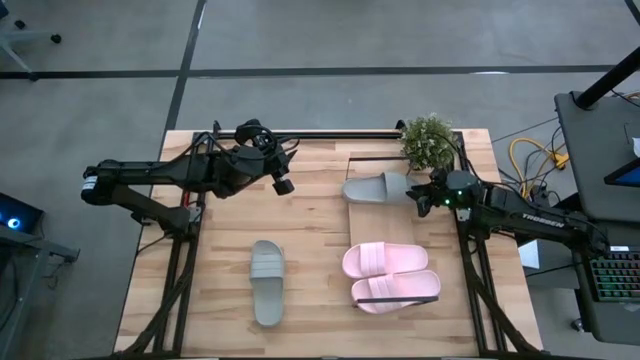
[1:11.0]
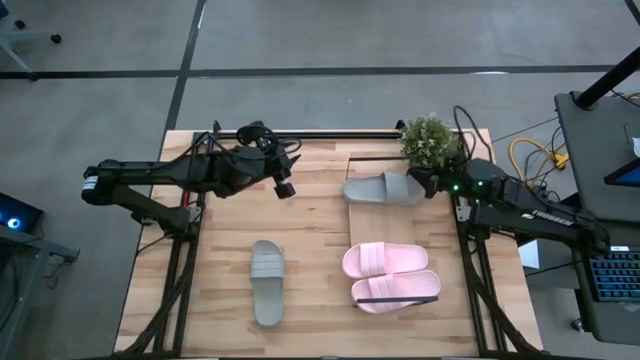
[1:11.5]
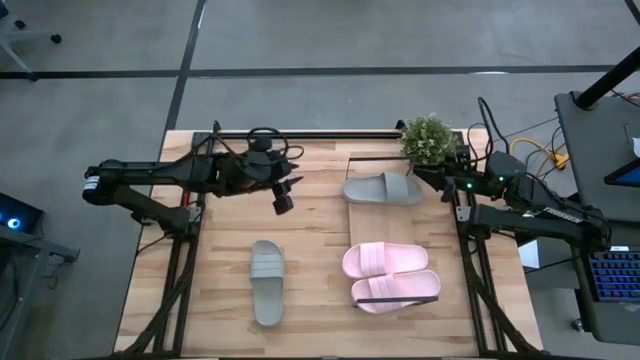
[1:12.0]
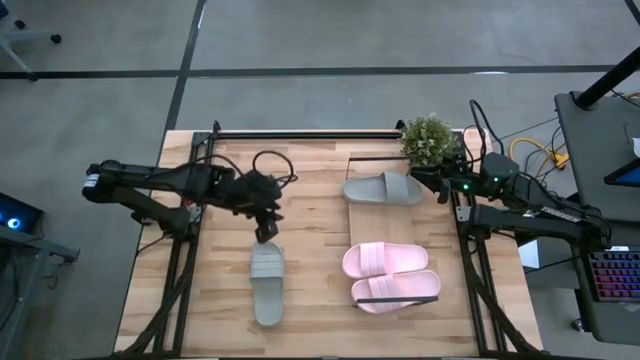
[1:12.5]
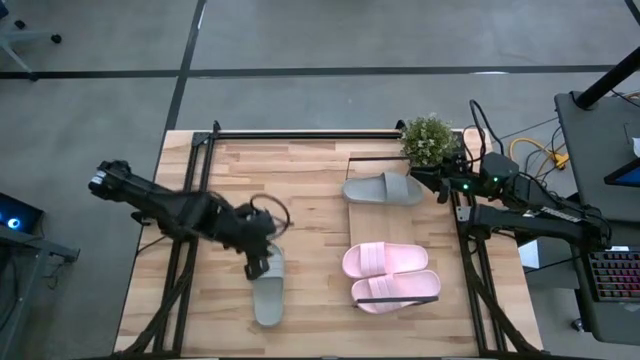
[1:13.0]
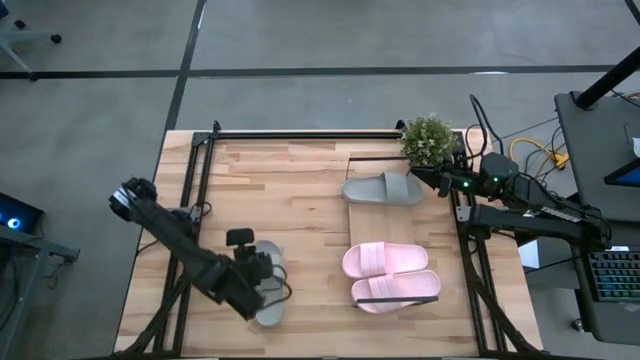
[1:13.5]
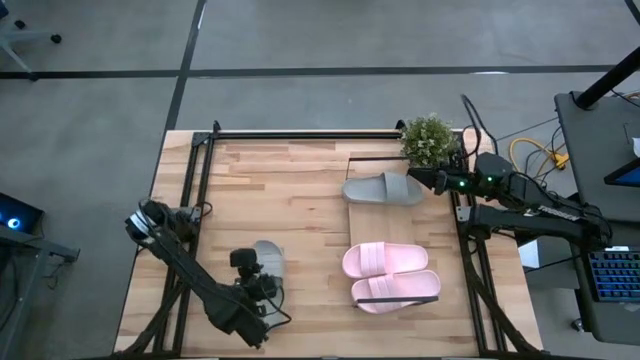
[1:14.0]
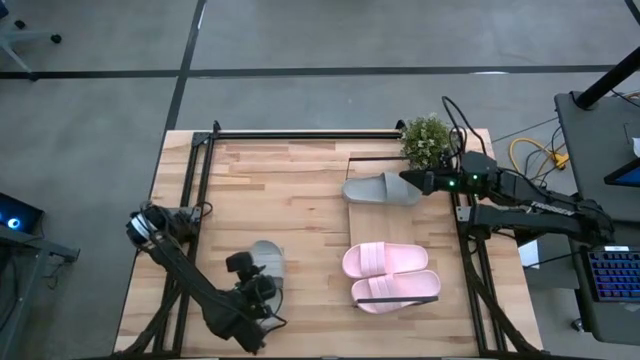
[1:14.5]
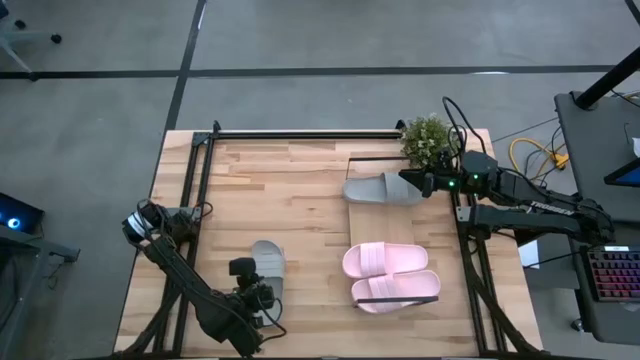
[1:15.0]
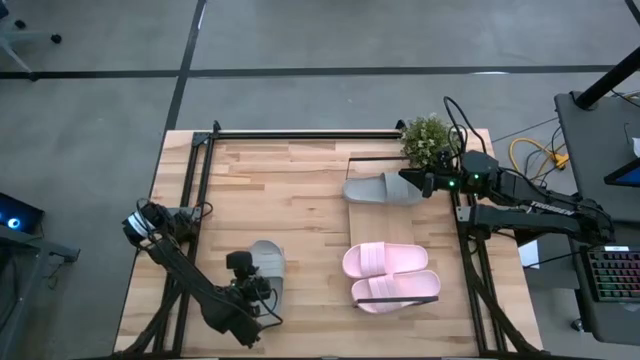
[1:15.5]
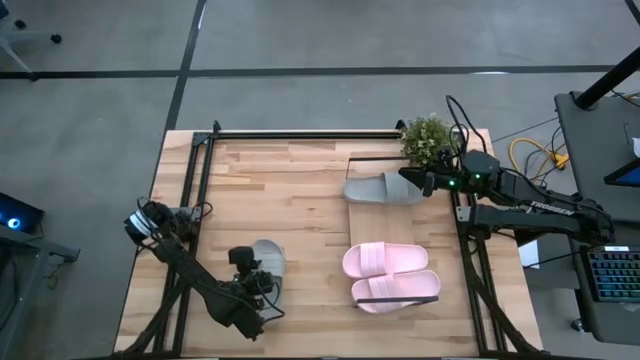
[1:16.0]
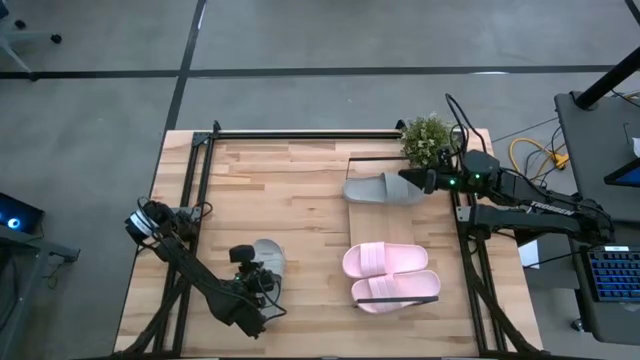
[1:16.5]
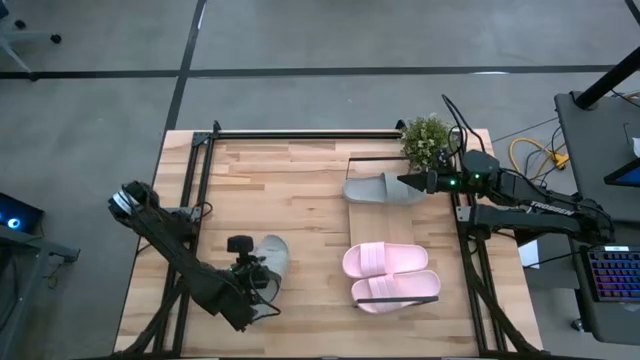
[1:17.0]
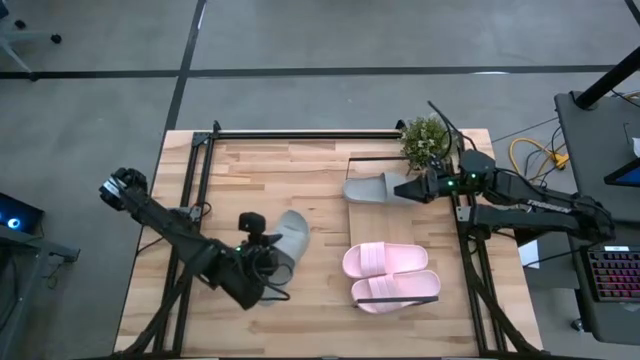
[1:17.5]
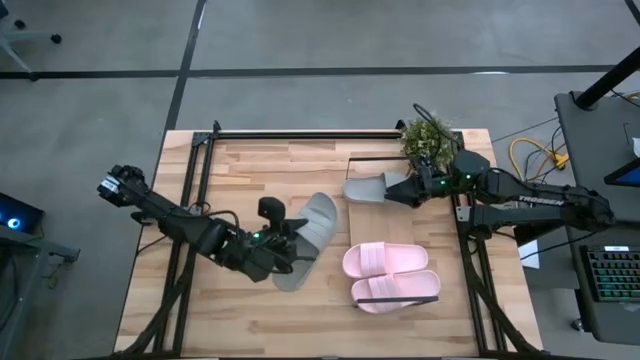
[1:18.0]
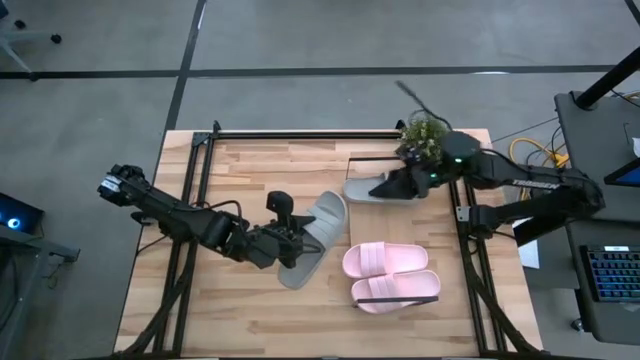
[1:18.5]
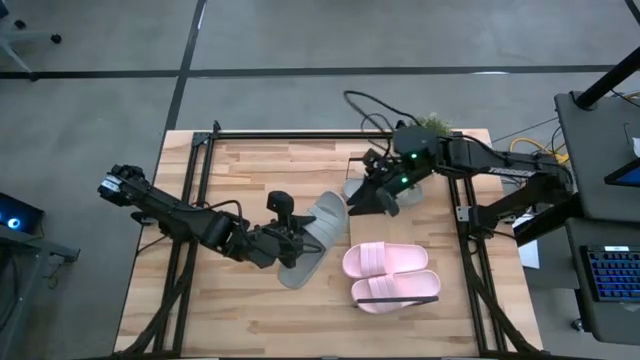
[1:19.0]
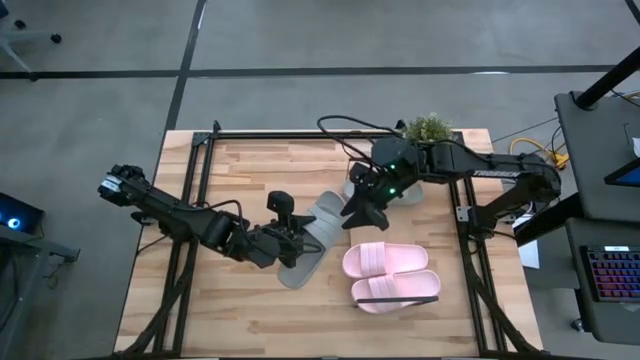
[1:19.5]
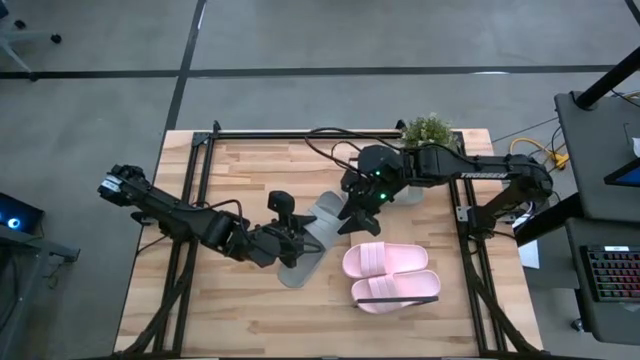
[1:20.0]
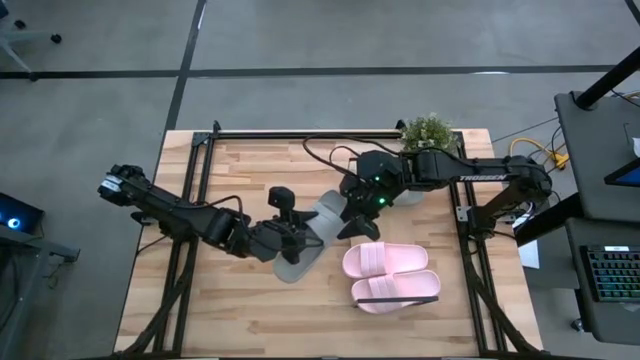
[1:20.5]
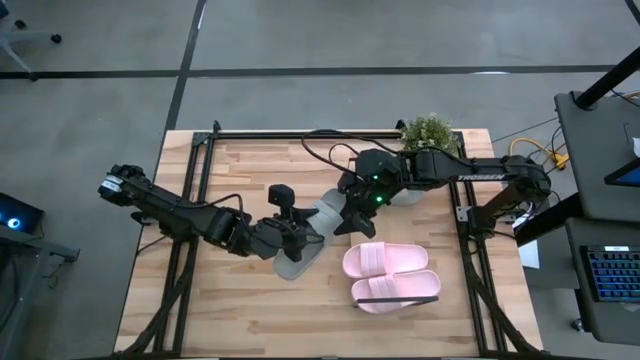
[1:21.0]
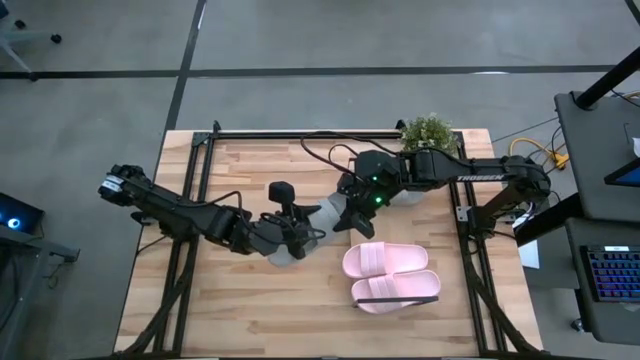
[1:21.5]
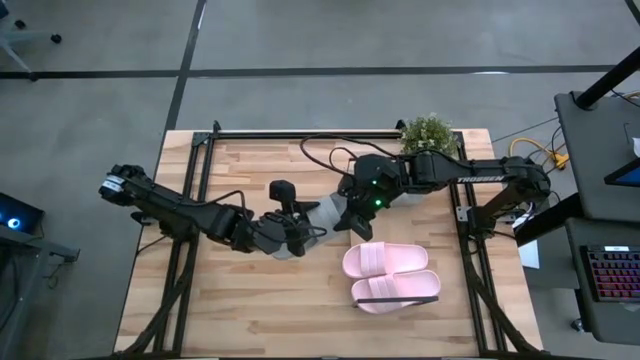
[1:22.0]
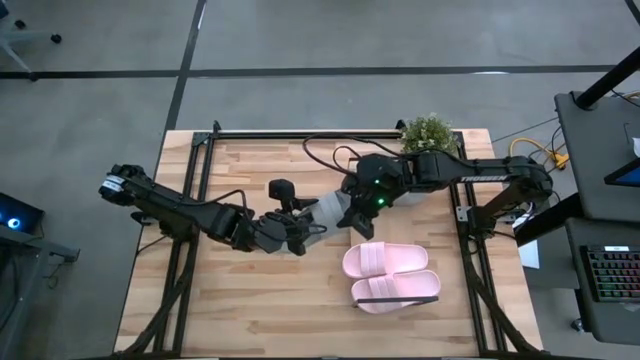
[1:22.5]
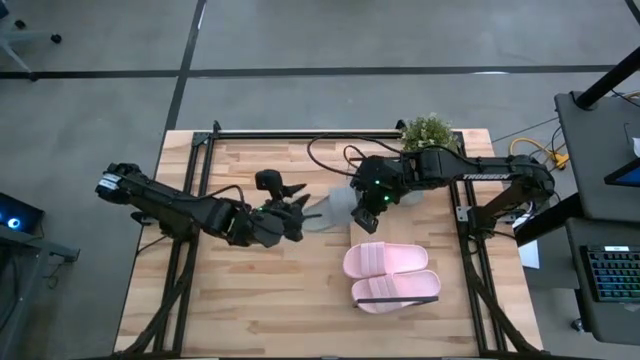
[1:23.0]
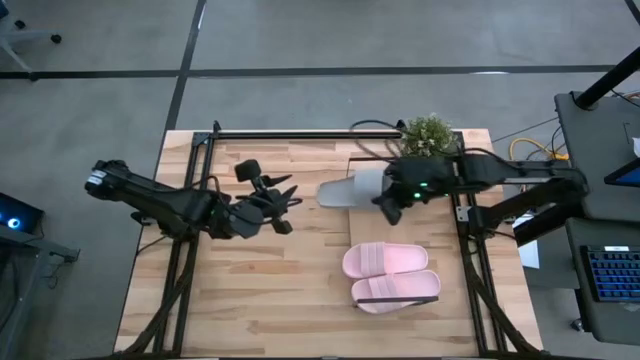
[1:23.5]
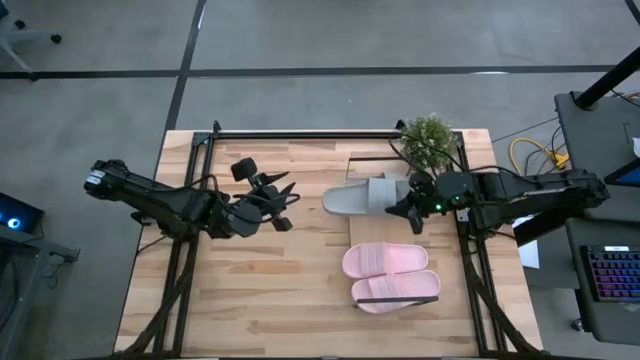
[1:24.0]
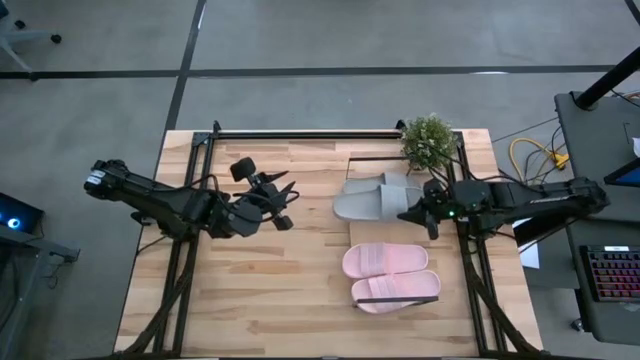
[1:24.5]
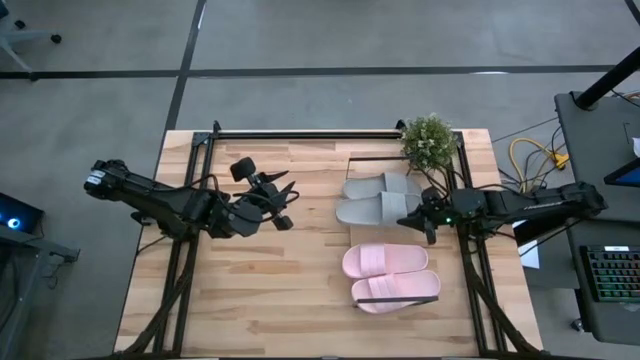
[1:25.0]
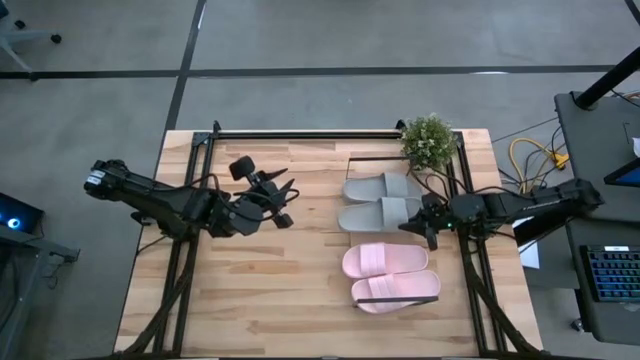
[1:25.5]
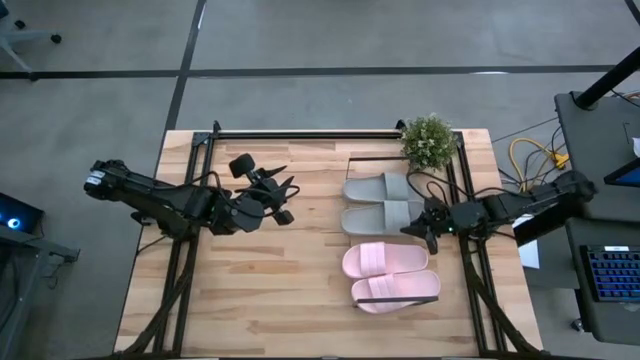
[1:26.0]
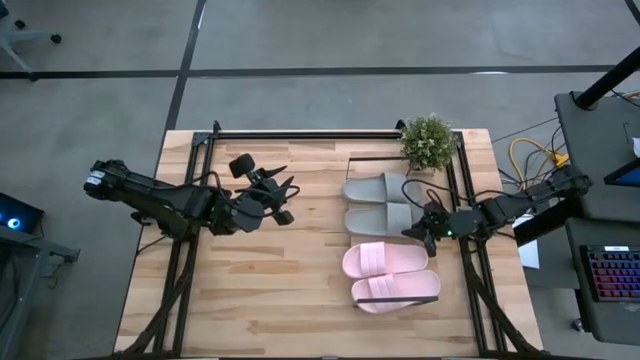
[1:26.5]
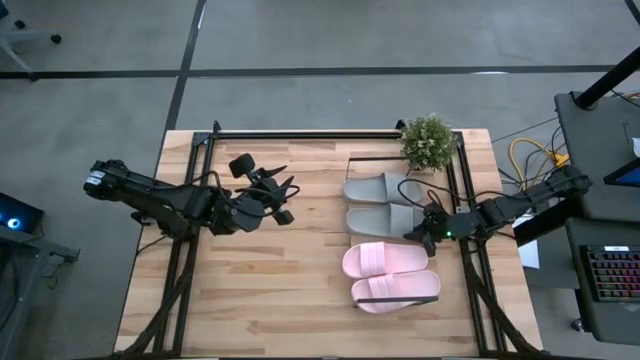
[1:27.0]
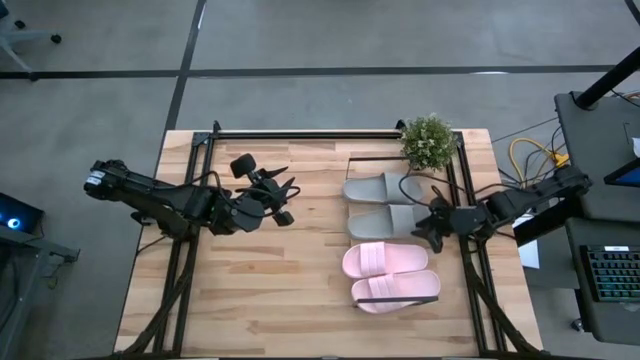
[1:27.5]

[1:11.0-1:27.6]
Task: Pick and place slides into the shelf
Put the gray slide on the shelf

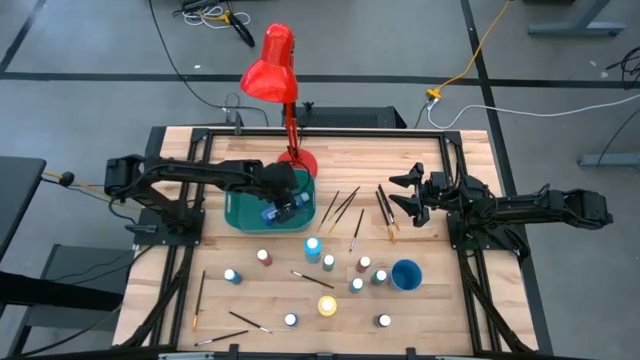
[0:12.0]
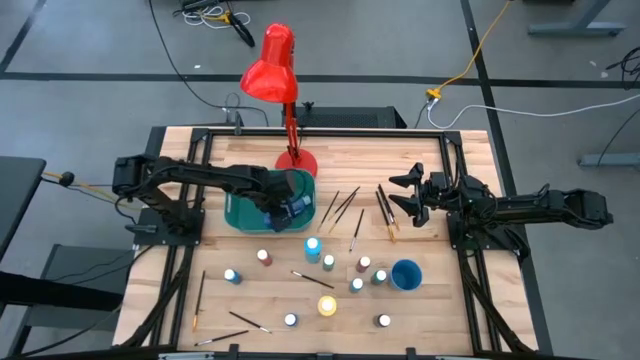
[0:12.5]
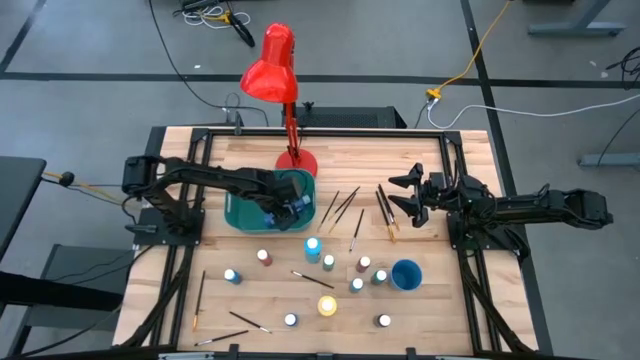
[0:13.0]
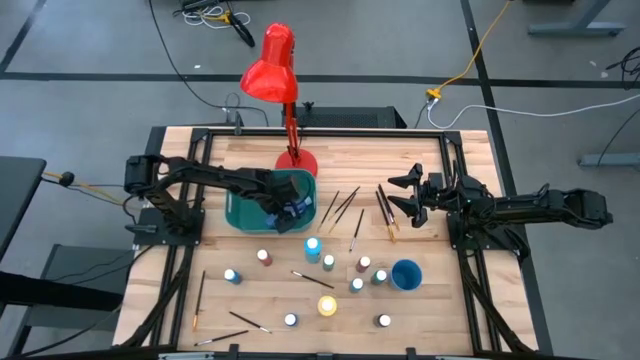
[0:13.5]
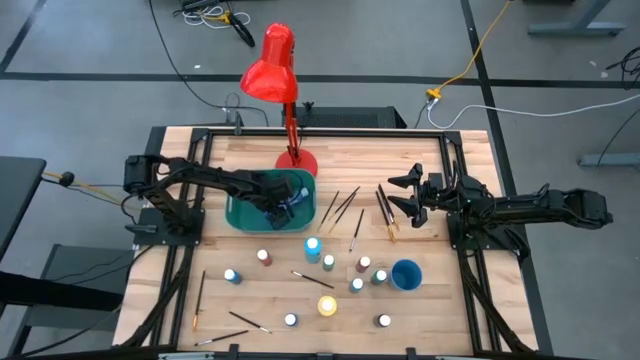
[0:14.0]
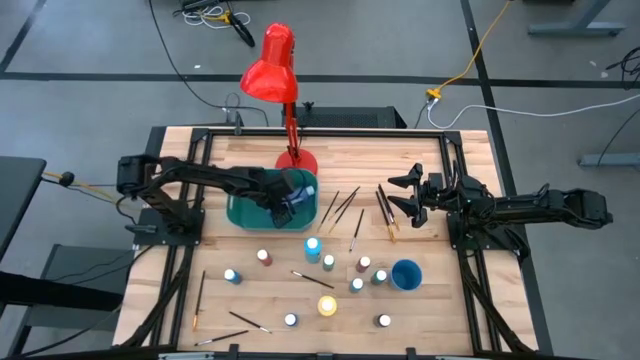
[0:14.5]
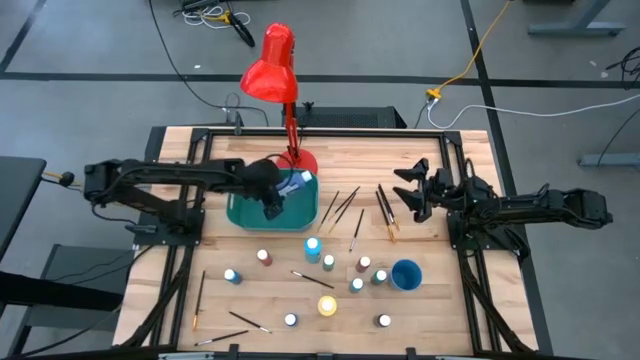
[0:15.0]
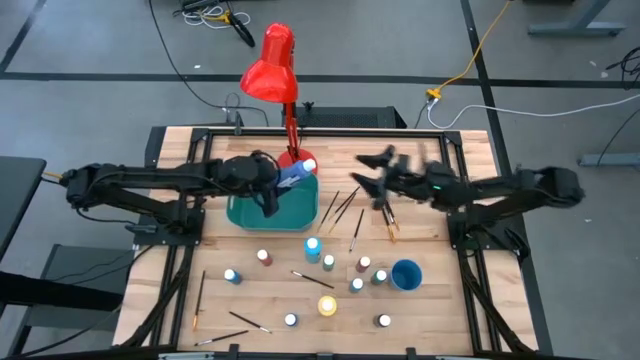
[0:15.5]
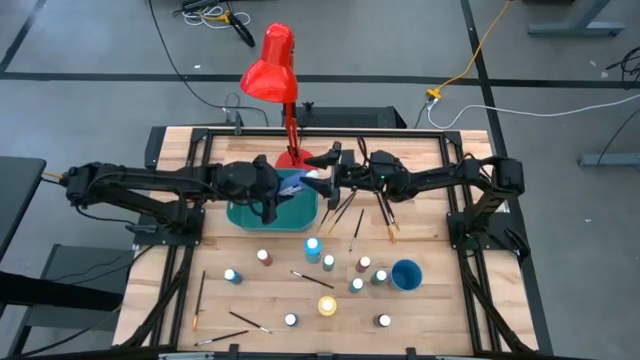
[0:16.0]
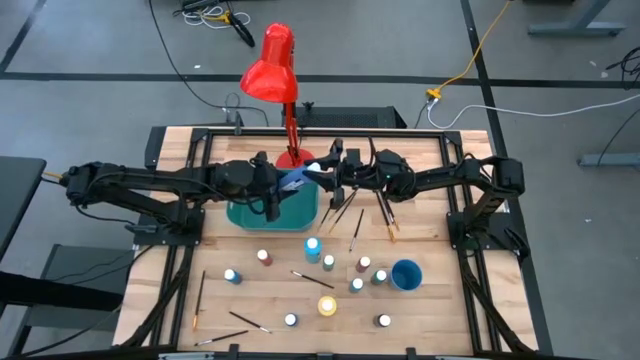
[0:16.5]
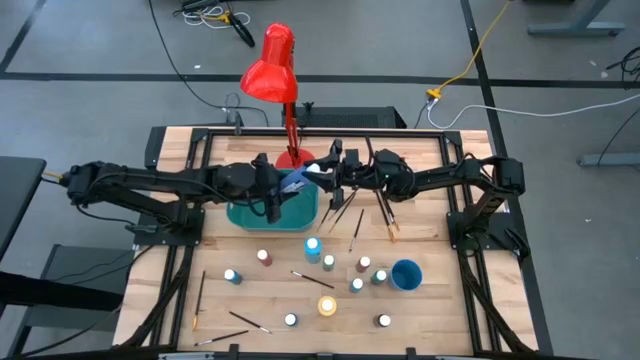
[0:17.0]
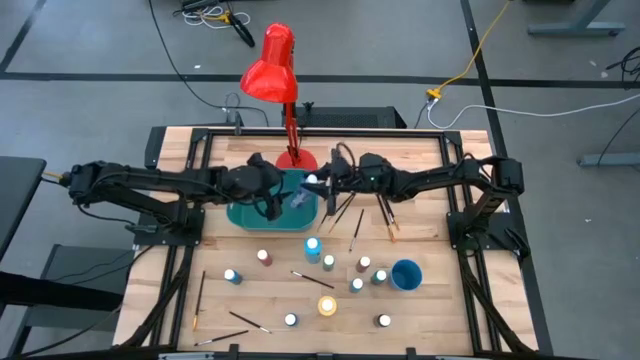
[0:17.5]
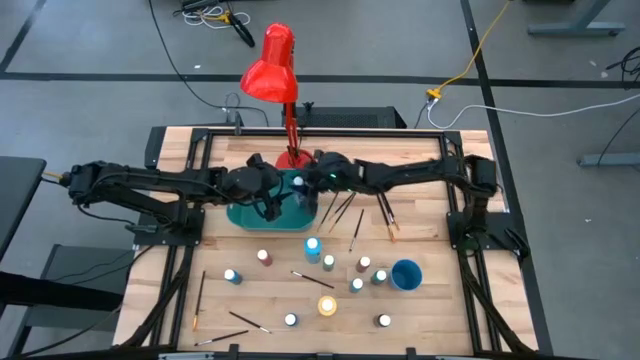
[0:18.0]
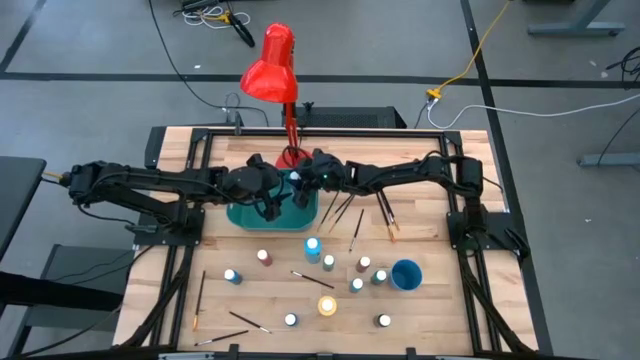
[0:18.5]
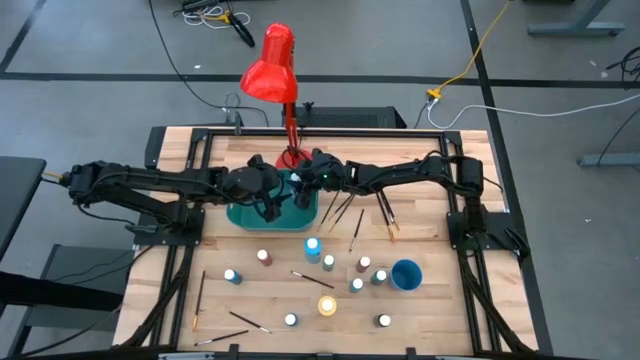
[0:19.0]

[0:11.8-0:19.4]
Task: Pick & Place Paint Supplies
Put the large purple paint bottle into the green bin
